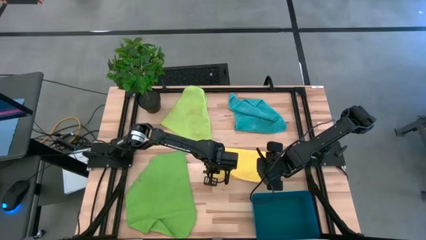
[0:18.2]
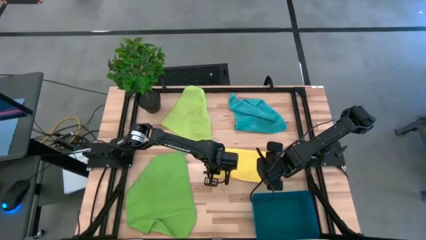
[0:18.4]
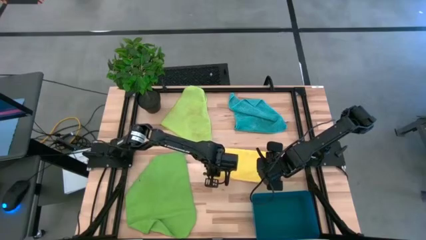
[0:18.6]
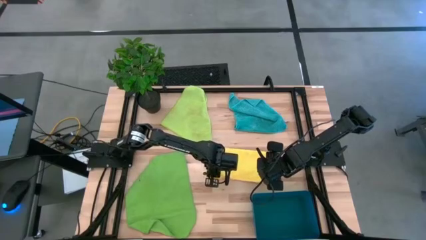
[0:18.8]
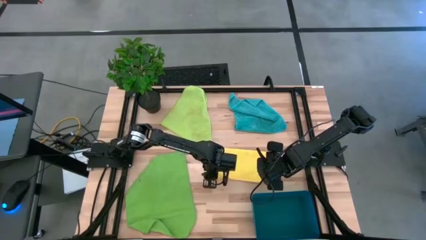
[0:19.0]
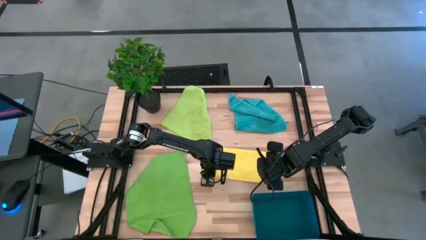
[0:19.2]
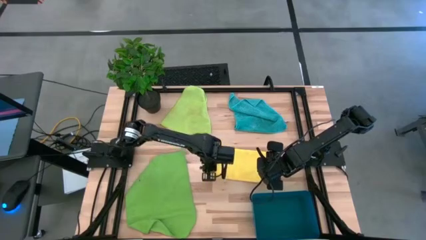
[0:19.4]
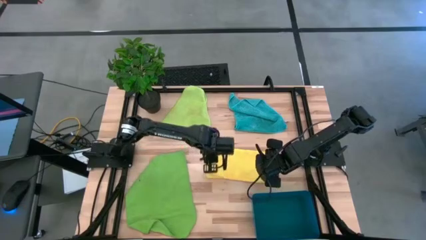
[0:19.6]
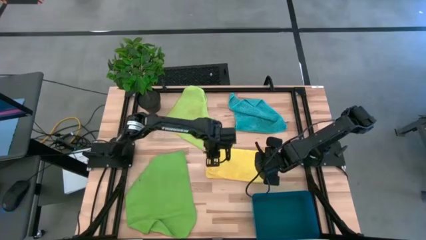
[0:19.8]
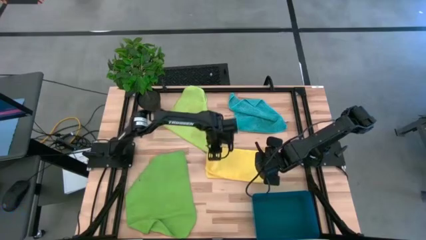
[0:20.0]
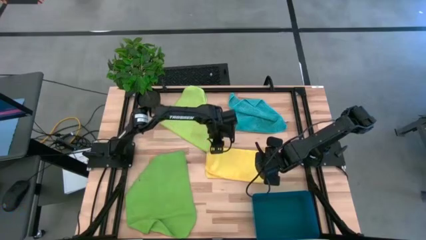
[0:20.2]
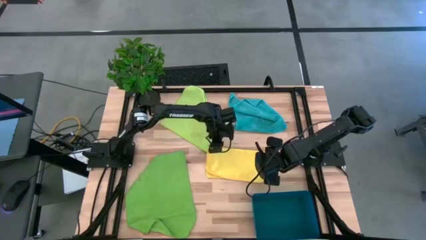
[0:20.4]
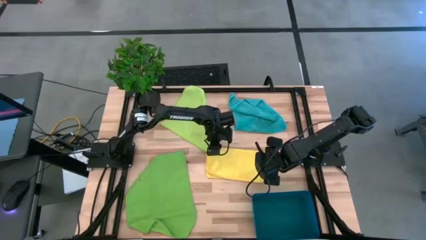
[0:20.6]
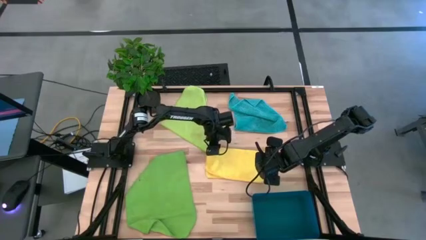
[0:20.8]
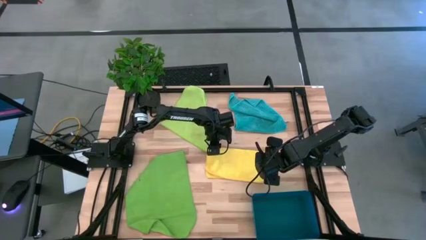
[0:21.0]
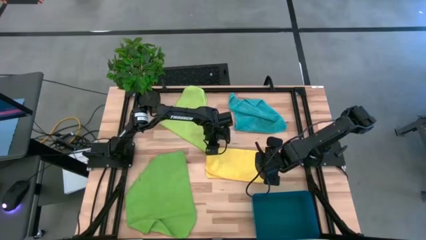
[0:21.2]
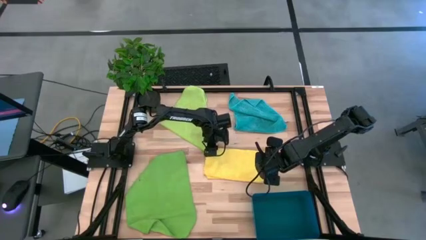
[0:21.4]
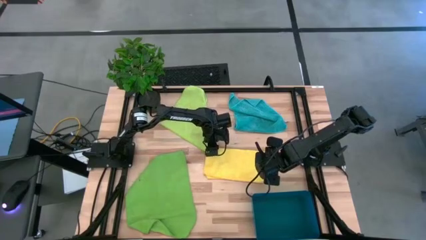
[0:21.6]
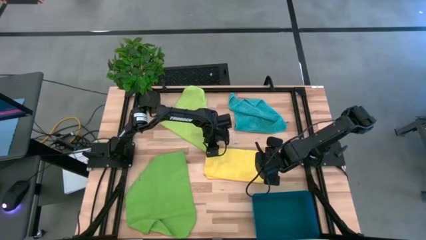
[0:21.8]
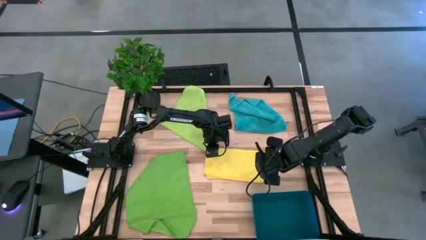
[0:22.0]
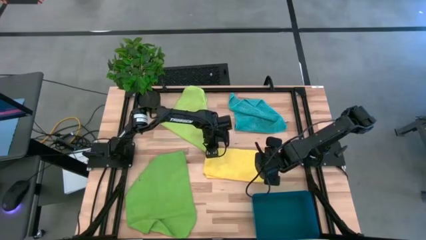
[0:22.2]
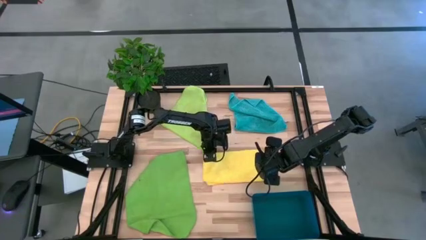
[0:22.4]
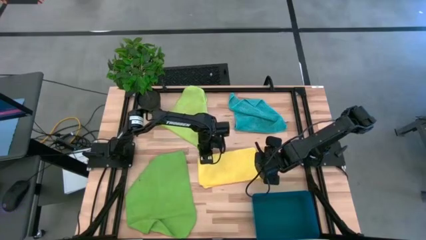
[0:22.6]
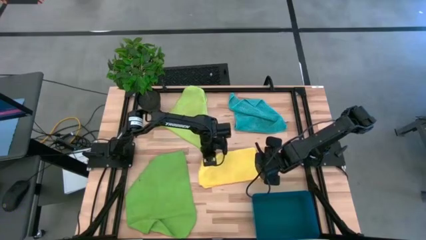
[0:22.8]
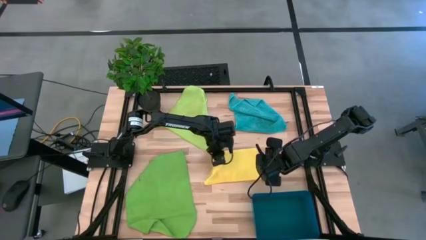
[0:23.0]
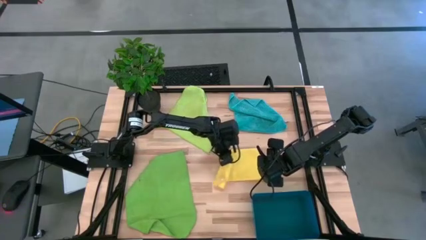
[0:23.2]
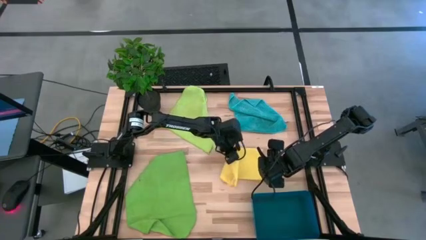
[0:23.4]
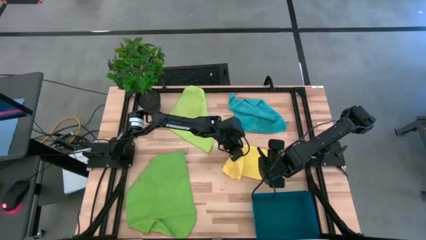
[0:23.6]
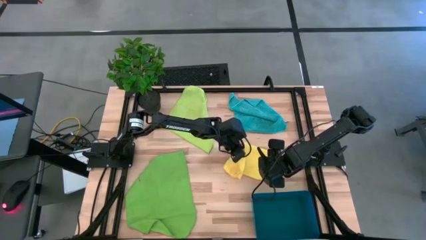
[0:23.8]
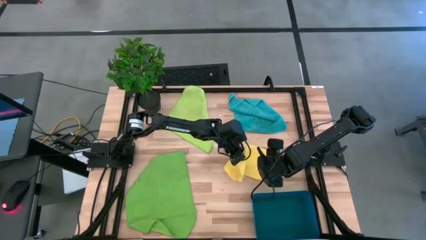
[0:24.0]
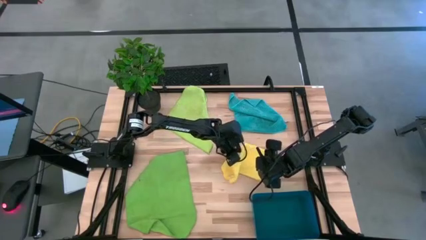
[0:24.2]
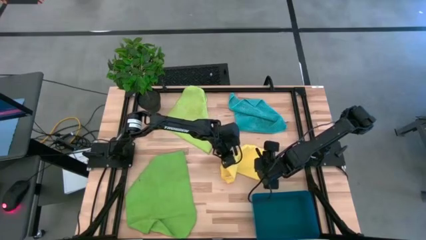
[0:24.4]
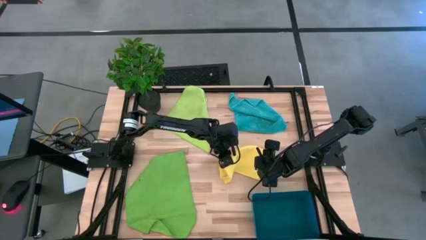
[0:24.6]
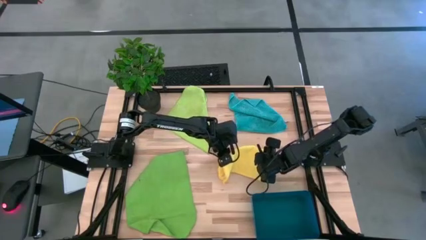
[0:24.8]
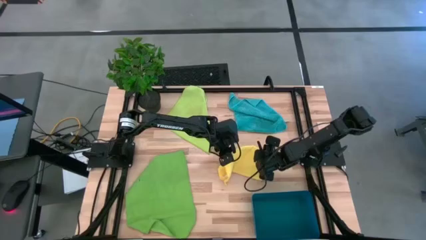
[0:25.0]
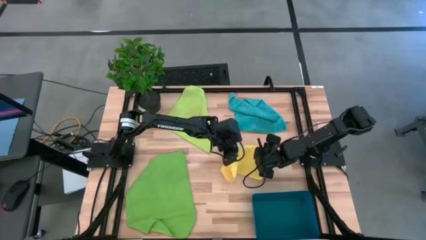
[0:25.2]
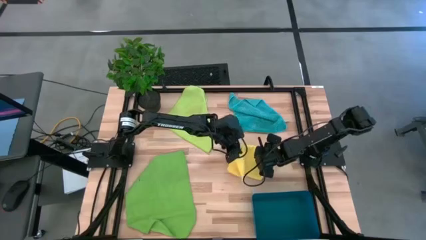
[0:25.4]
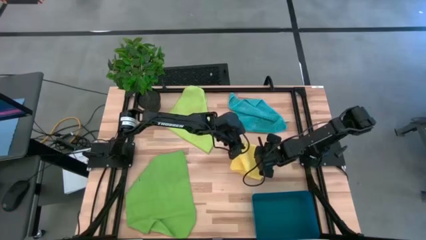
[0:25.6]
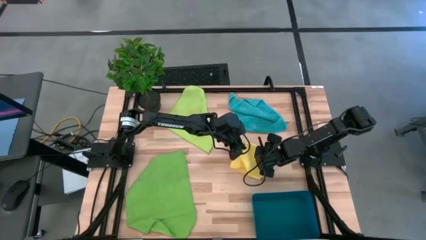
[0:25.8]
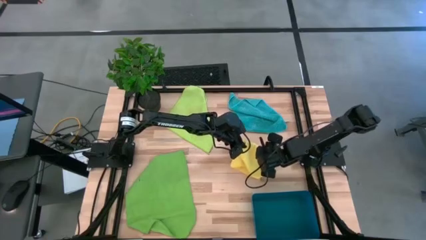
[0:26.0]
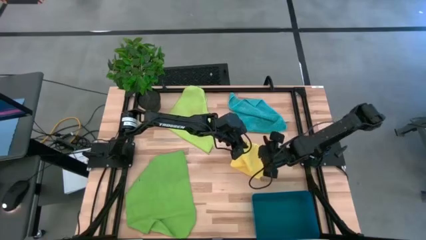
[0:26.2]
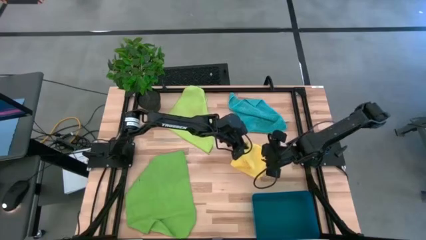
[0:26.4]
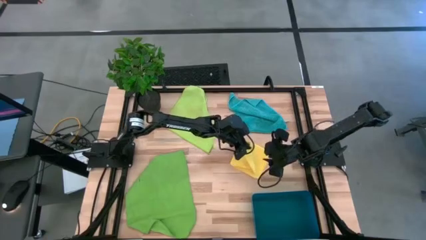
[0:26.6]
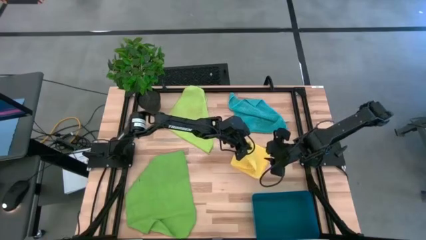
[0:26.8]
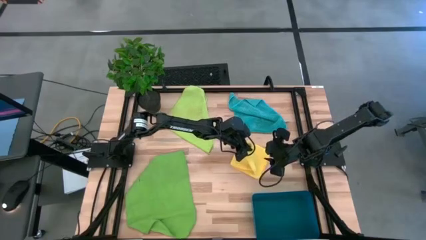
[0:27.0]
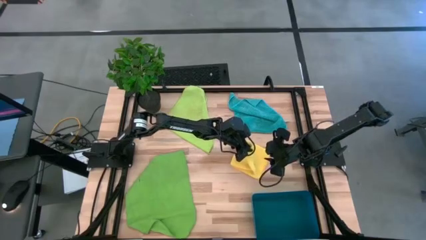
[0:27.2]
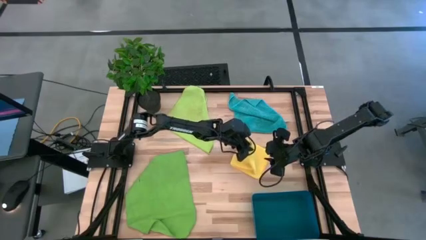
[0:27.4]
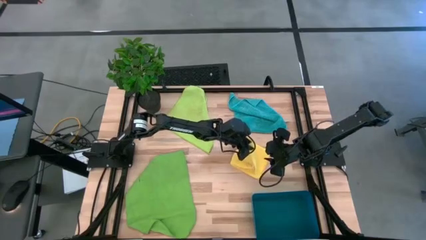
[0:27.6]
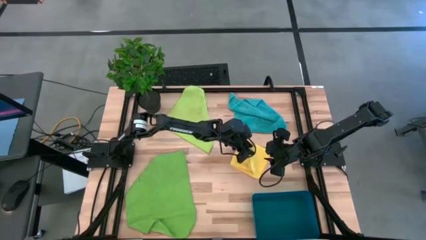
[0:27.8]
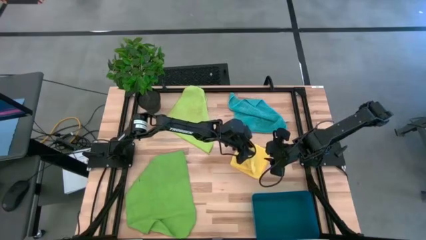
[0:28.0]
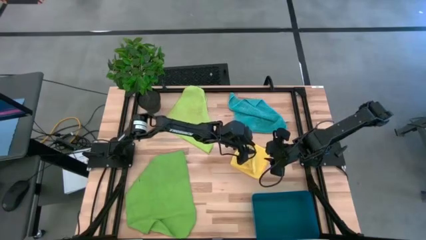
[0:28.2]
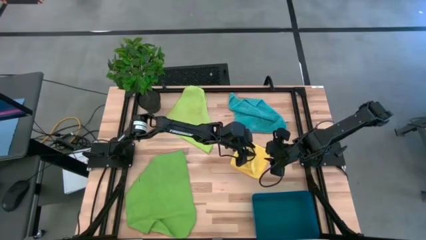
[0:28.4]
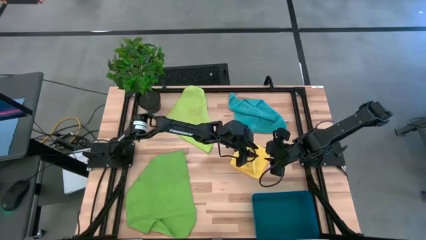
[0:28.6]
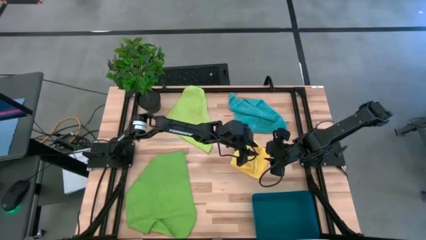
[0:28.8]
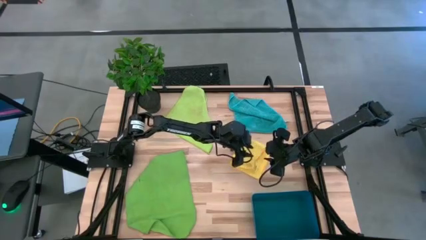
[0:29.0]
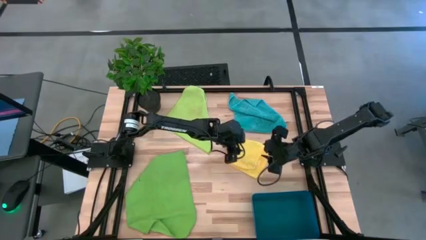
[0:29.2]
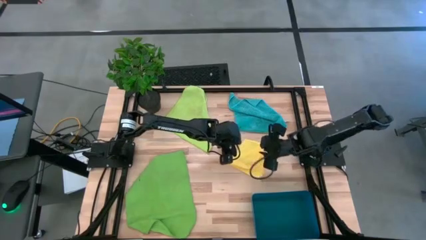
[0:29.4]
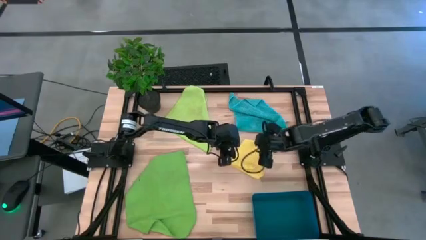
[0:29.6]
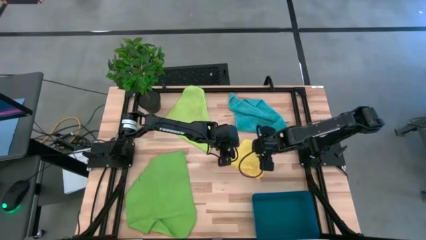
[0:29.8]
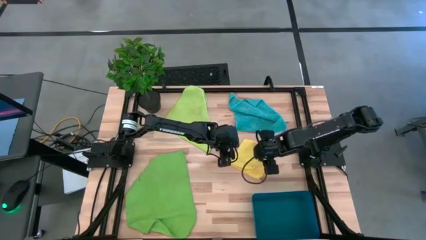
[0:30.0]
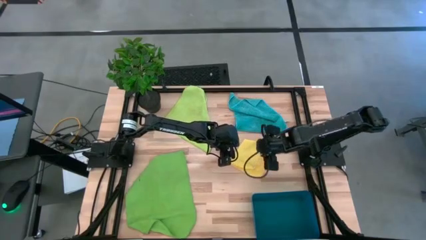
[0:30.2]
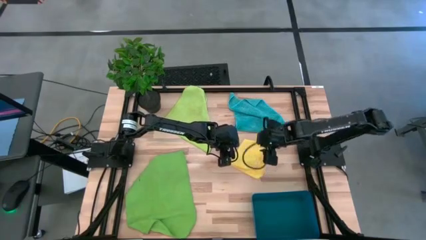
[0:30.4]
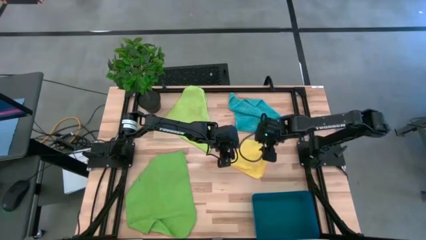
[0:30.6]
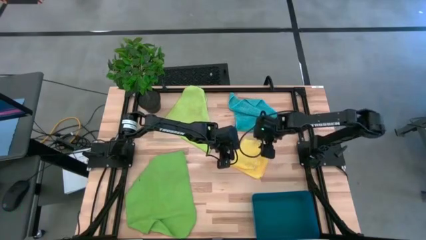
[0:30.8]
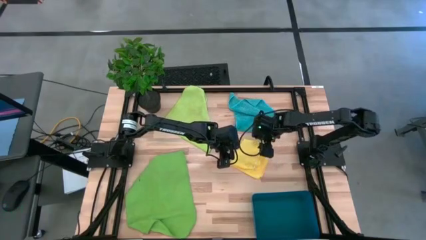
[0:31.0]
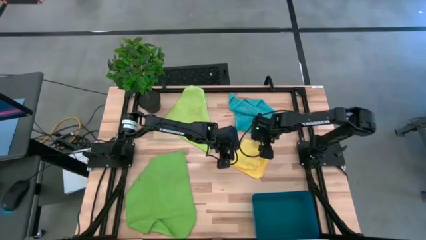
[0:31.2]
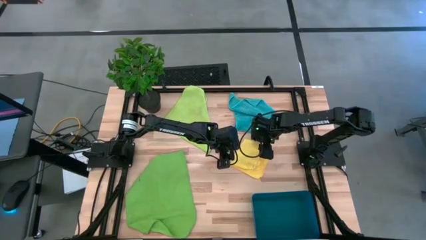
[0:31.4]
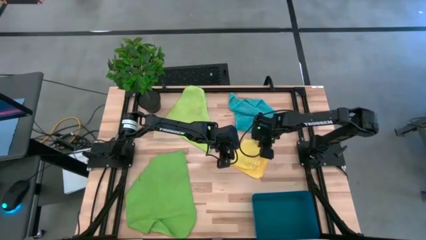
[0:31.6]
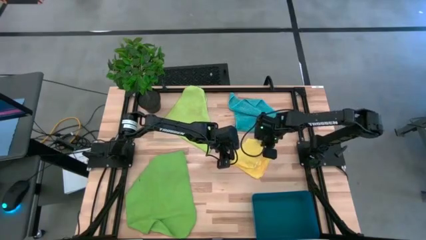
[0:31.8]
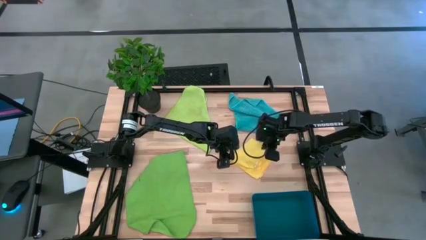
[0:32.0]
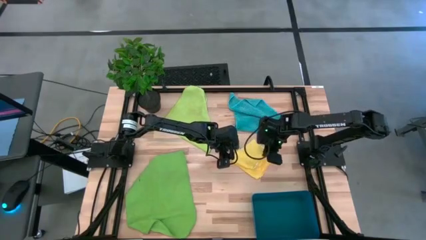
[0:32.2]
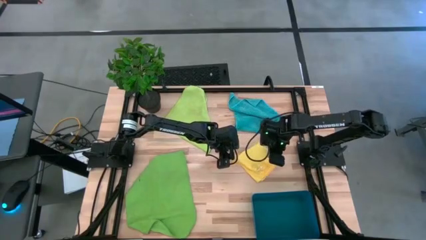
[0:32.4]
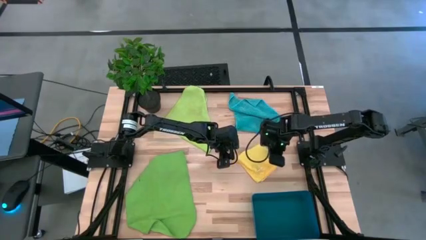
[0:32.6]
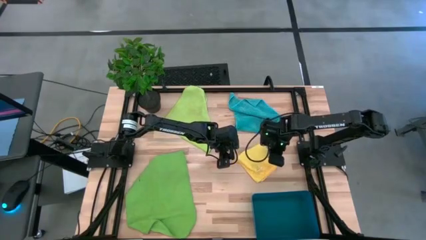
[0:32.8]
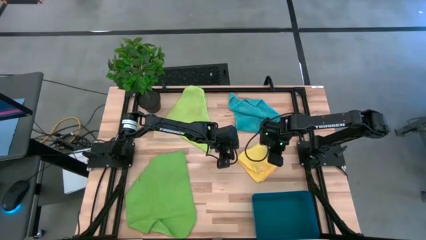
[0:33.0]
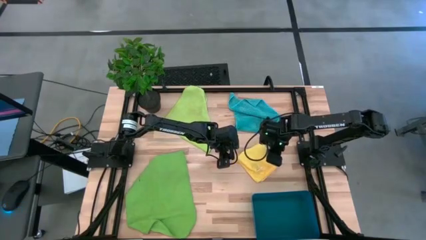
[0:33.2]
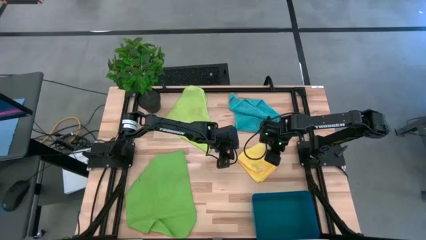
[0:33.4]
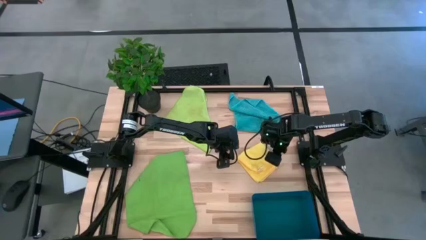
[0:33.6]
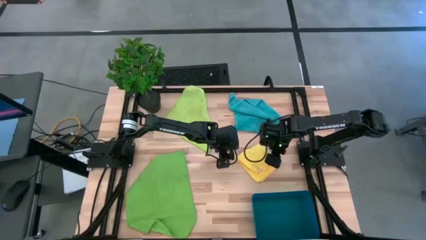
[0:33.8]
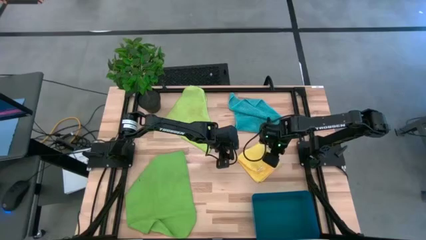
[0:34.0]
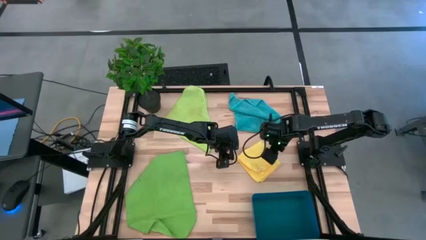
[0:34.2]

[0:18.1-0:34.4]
Task: Fold microfiber towels
Fold the yellow towel

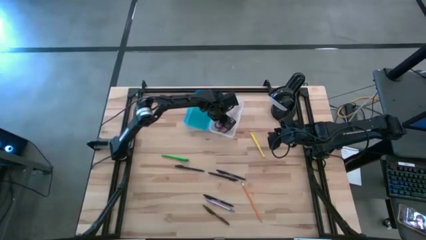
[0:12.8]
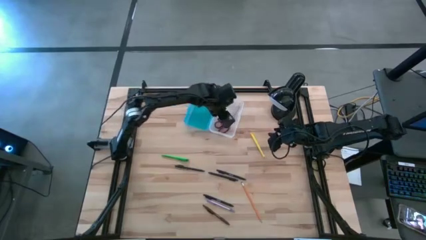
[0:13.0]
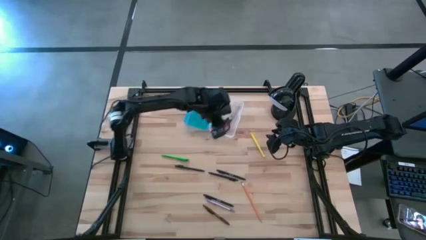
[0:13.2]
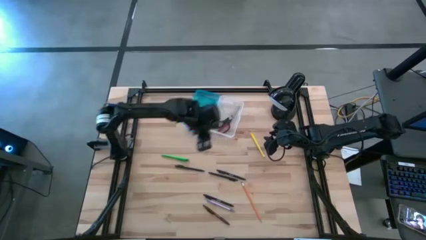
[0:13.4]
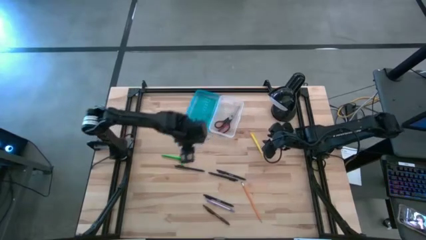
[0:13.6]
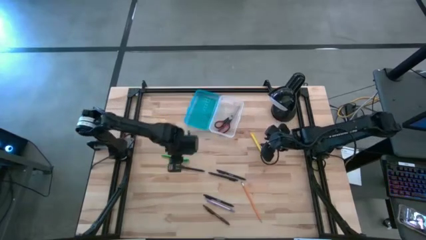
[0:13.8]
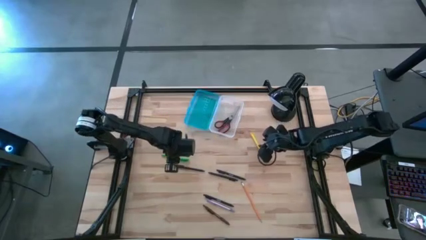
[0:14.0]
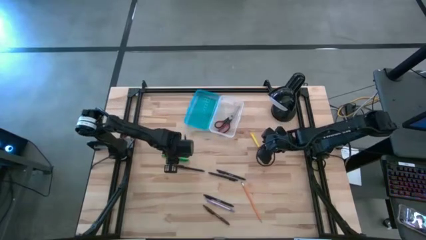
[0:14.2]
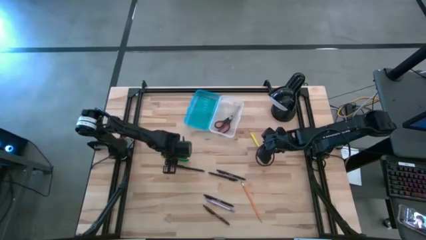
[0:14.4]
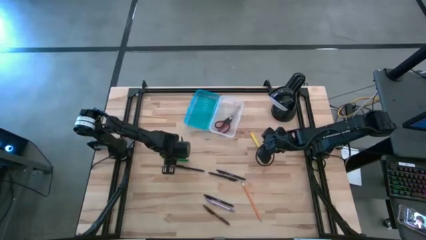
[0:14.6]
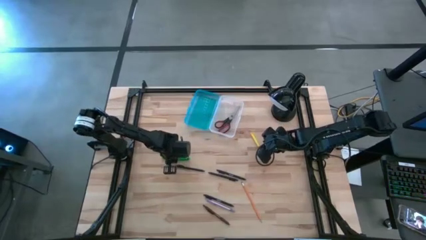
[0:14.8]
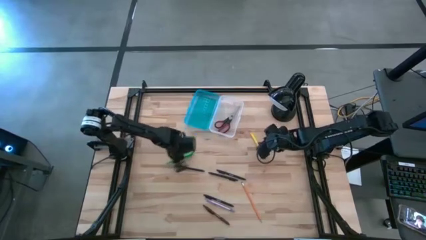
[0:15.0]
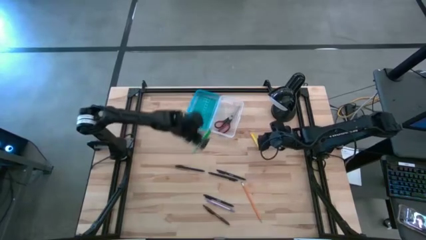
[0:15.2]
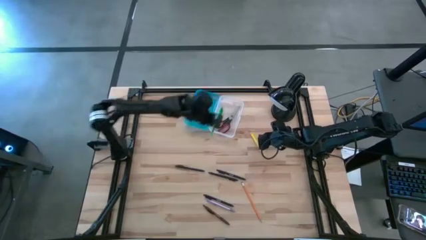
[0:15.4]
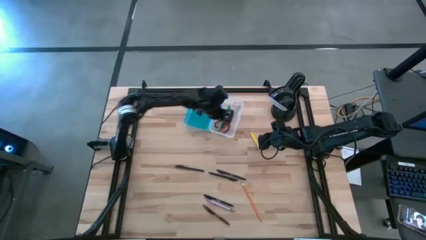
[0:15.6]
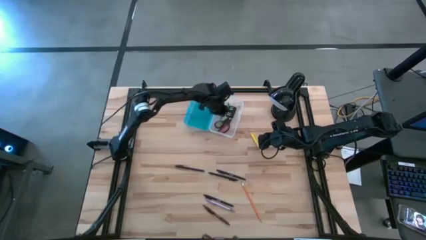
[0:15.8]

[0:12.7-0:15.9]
Task: Pick & place school supplies into a supply box
Put the green pen into the blue supply box
